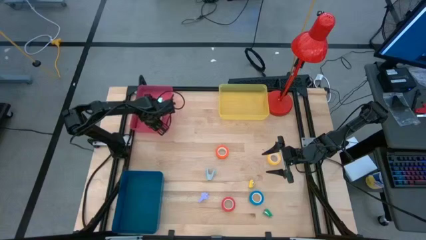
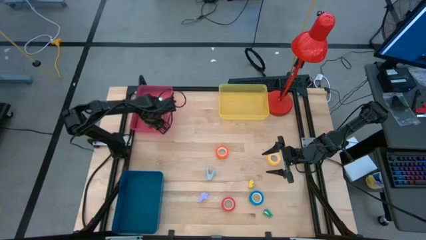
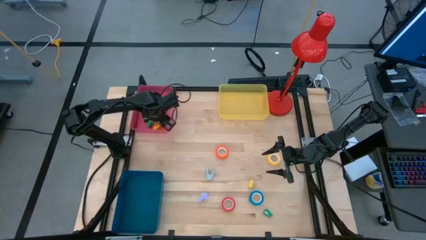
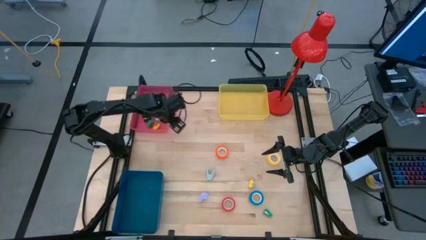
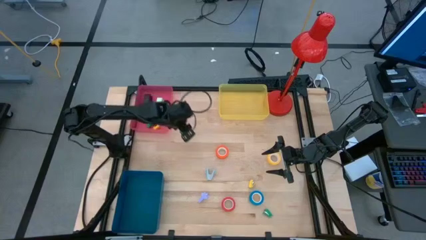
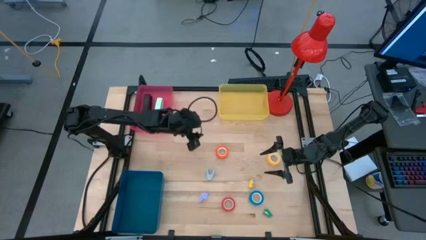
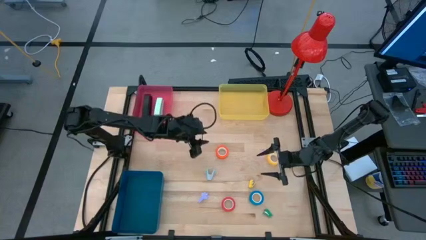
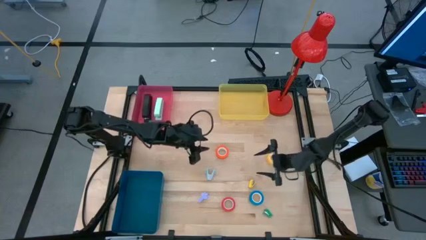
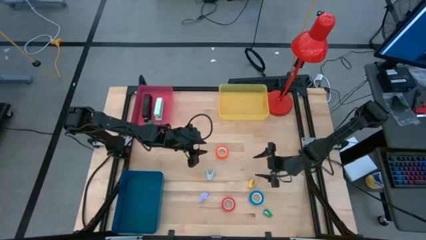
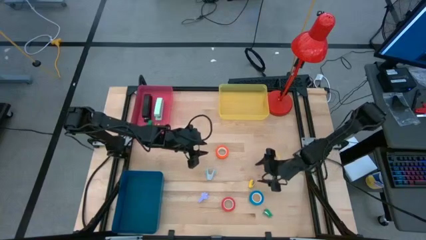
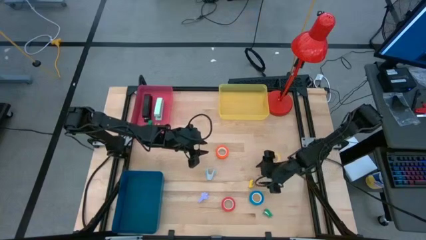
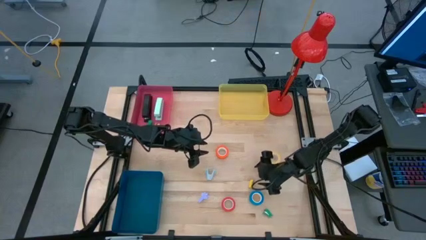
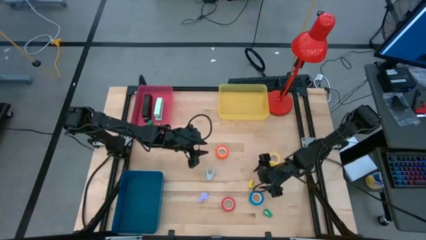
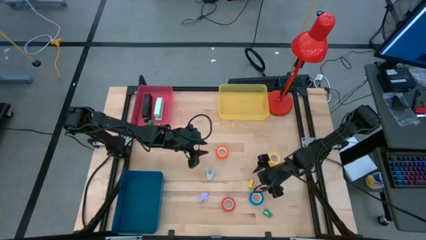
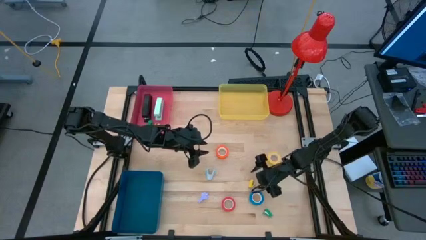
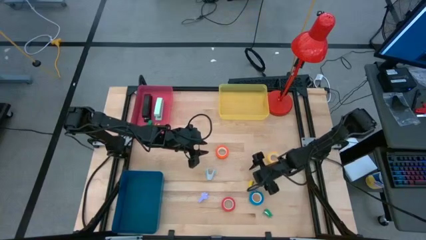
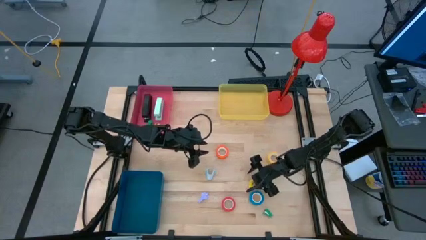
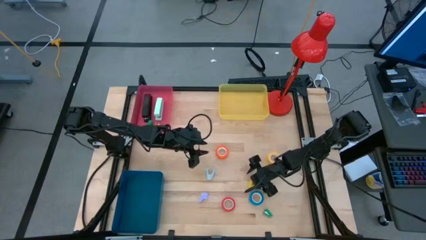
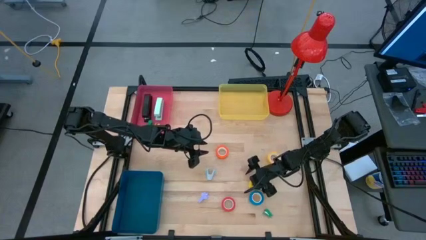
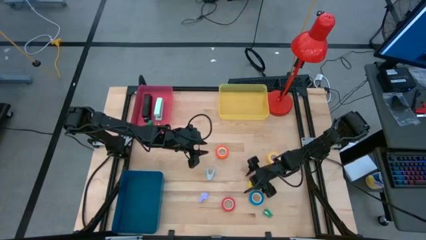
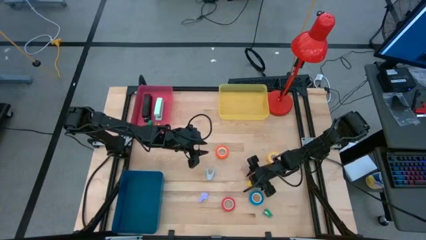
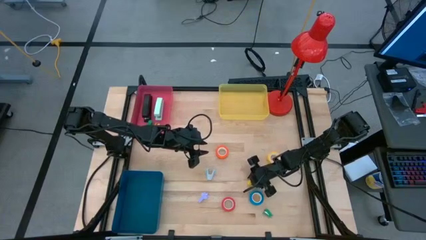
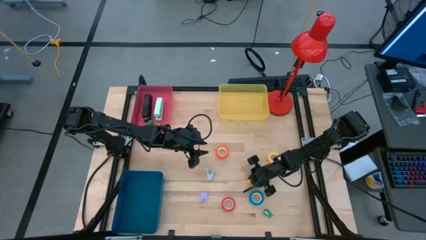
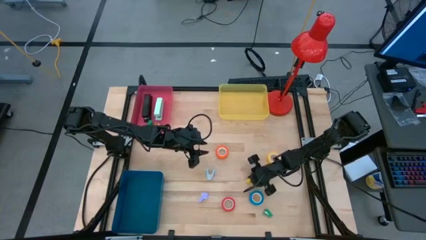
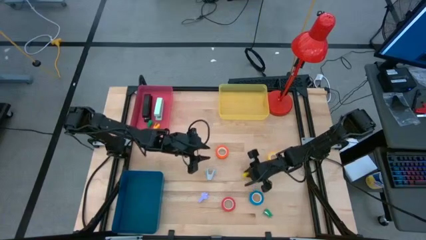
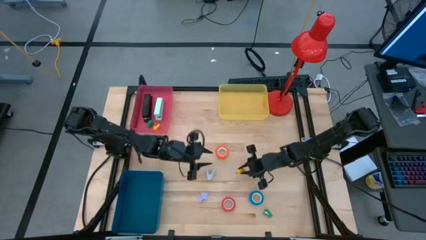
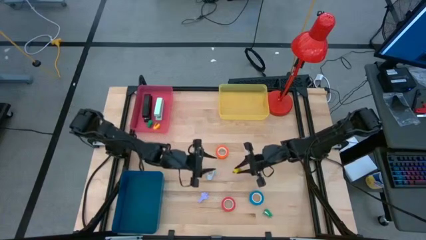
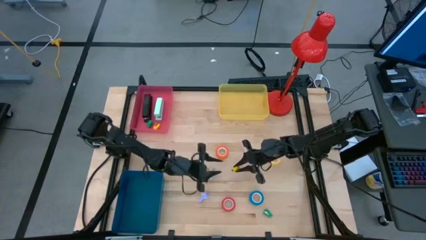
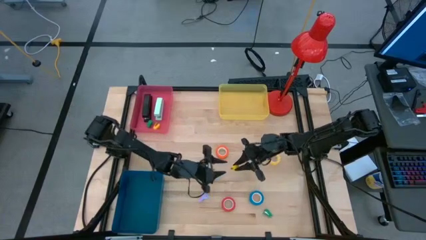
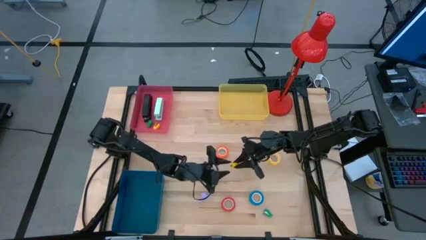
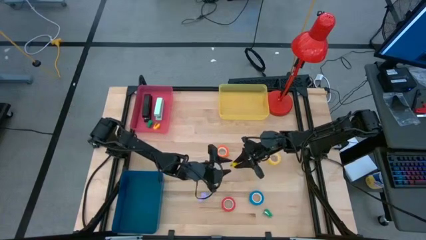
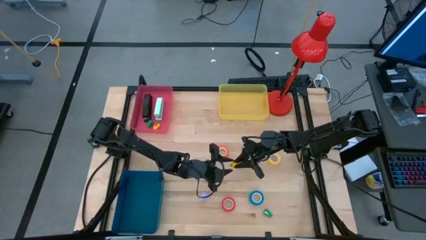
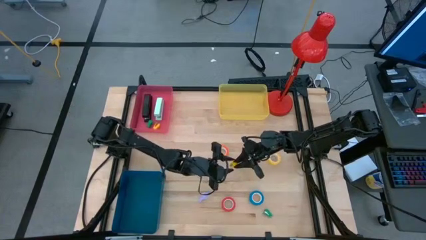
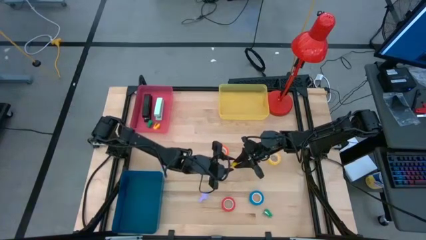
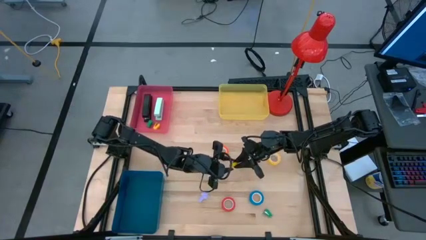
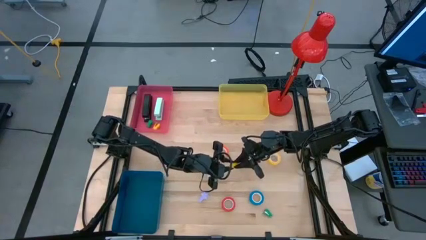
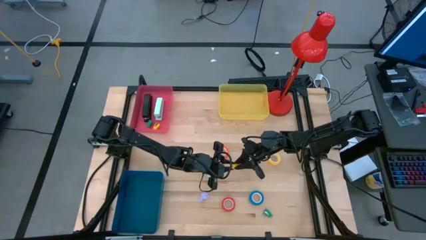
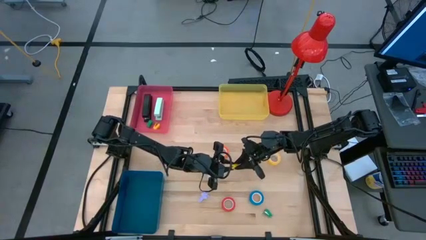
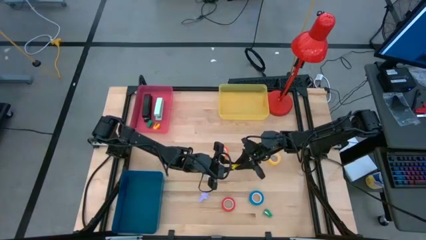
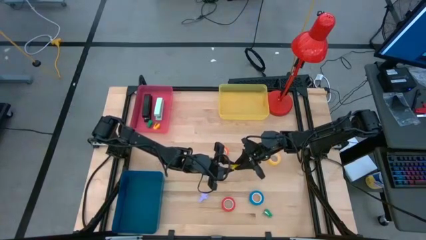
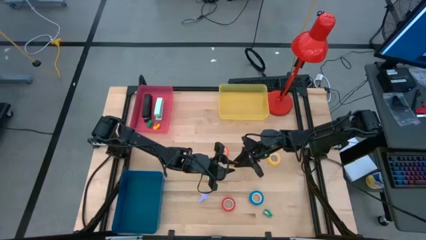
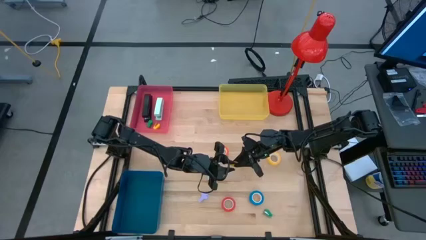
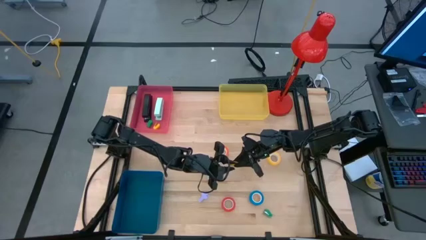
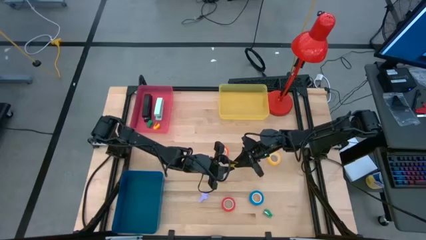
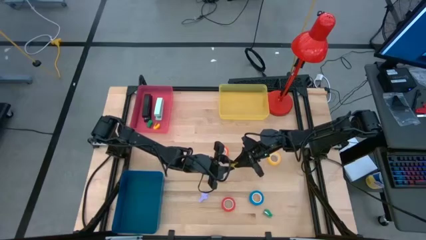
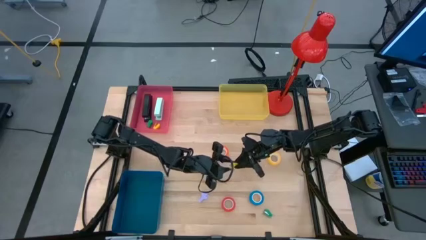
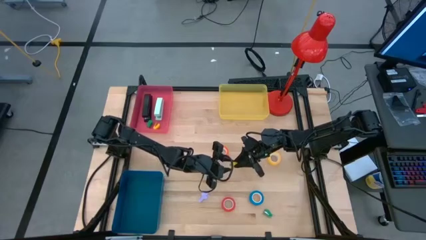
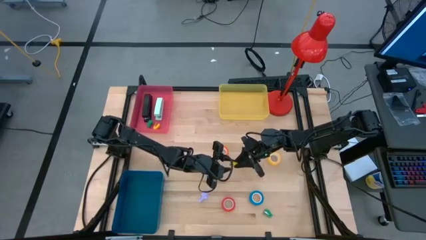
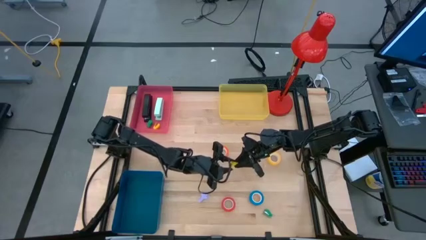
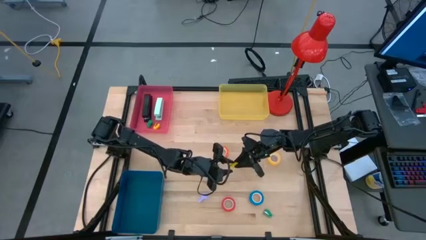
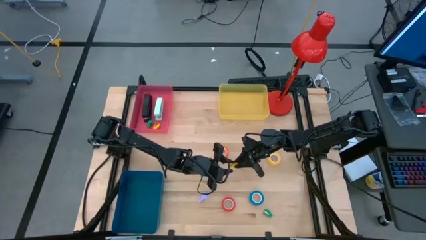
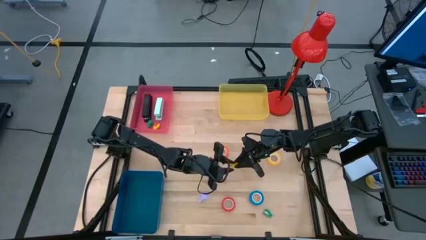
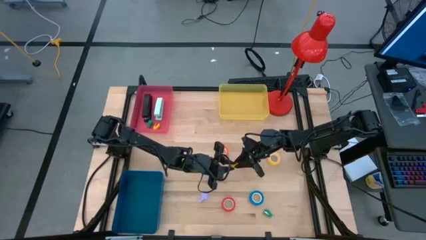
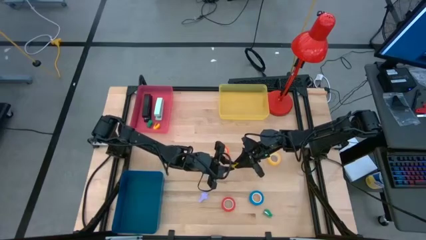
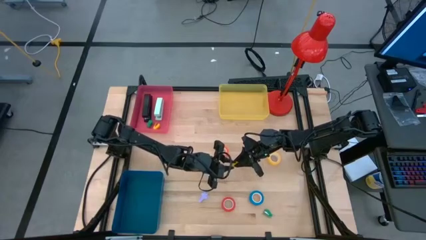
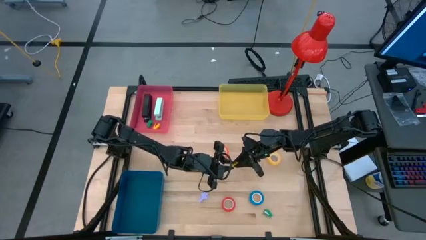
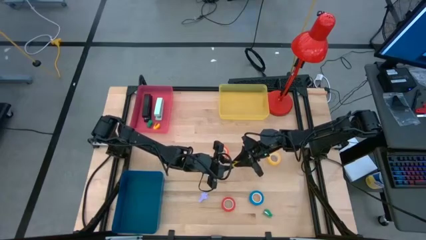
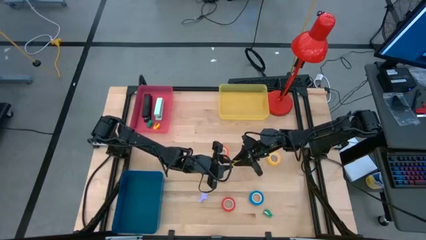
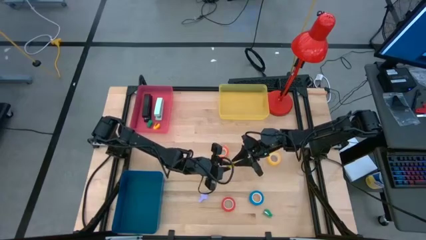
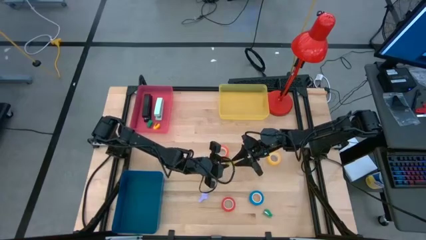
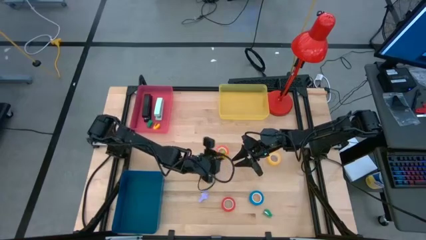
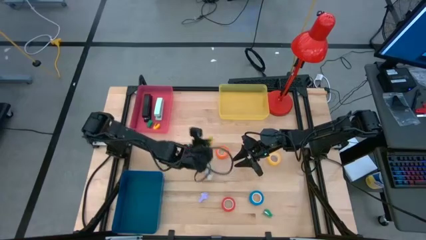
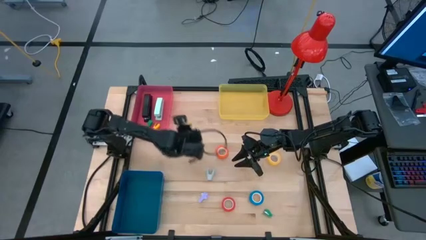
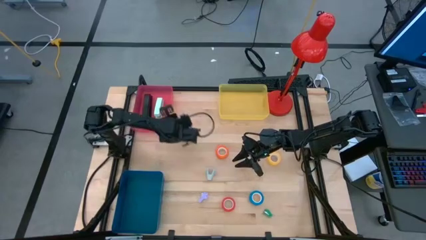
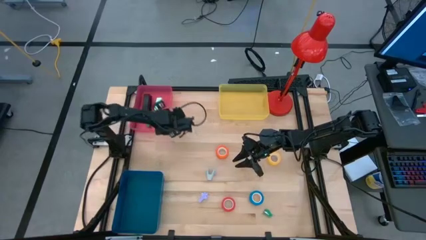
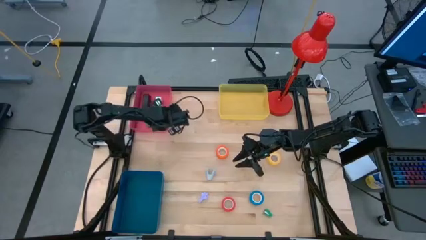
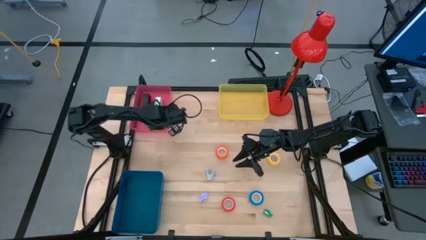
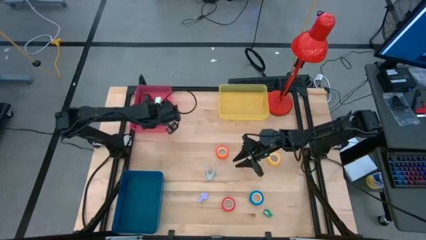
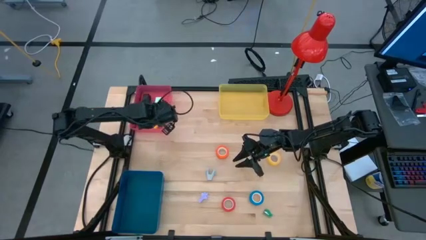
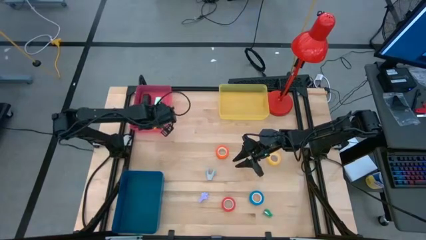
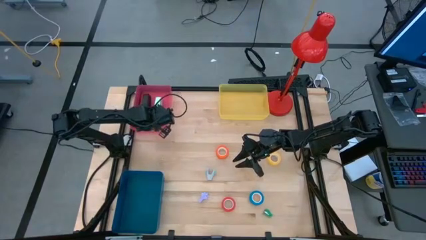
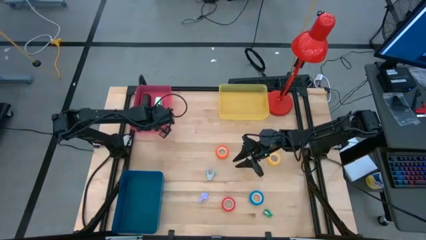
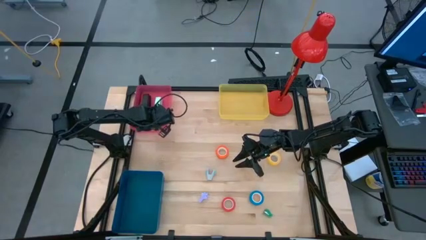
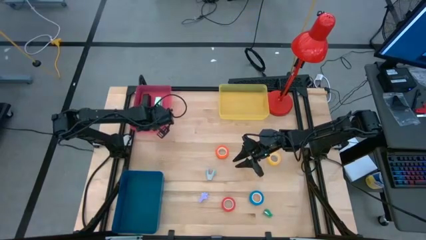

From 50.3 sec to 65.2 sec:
Task: Pick and place Stapler, Stapler remover, tape
Put the yellow stapler into the pink bin
